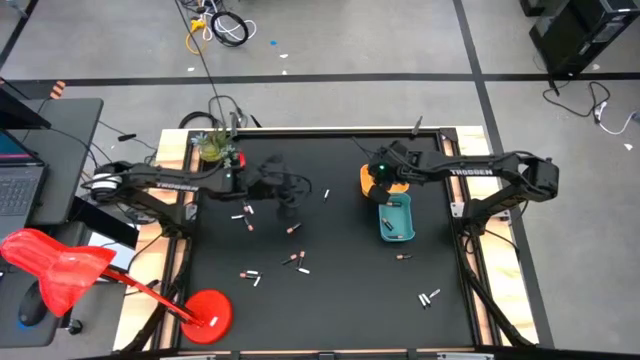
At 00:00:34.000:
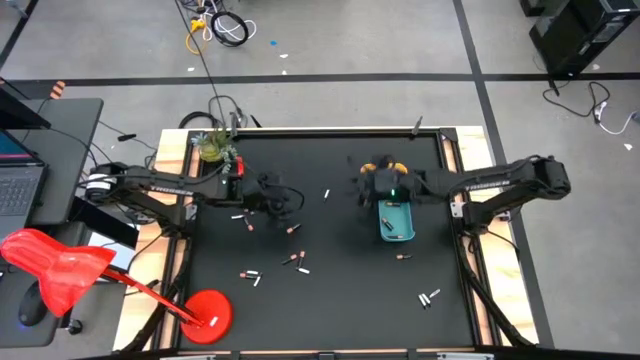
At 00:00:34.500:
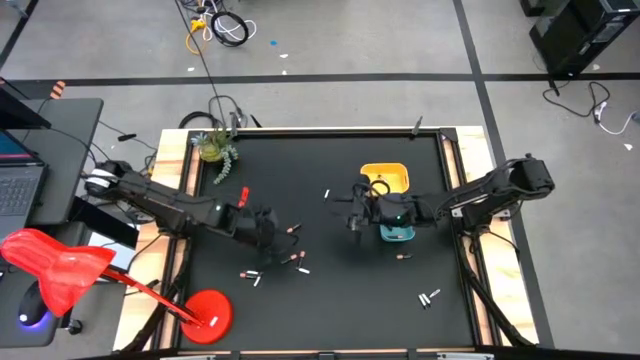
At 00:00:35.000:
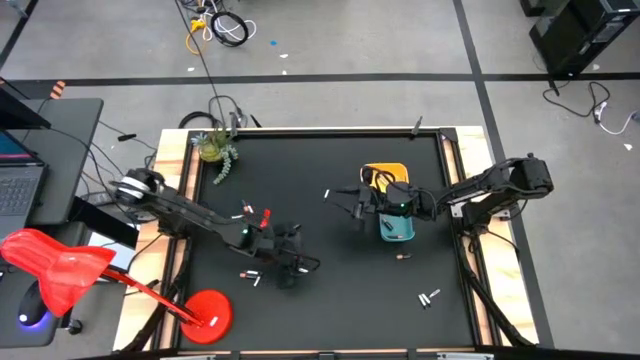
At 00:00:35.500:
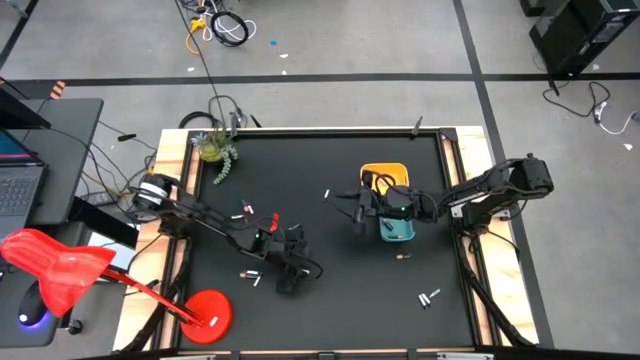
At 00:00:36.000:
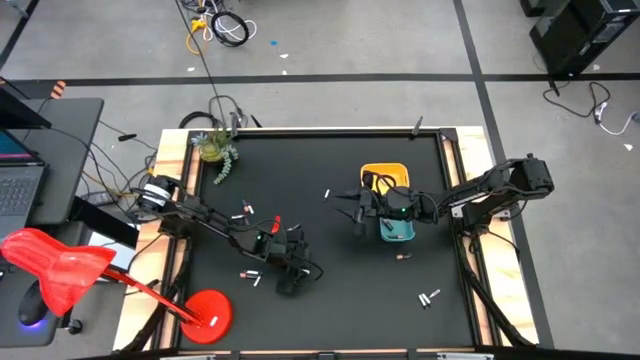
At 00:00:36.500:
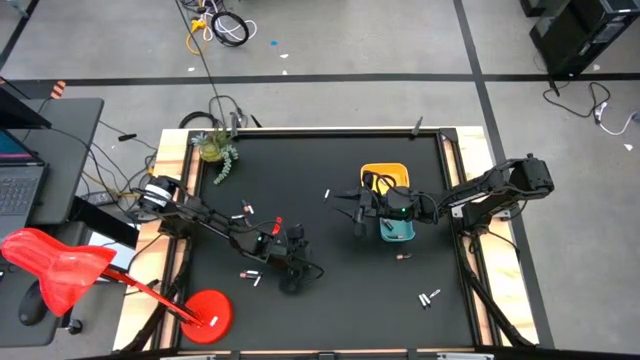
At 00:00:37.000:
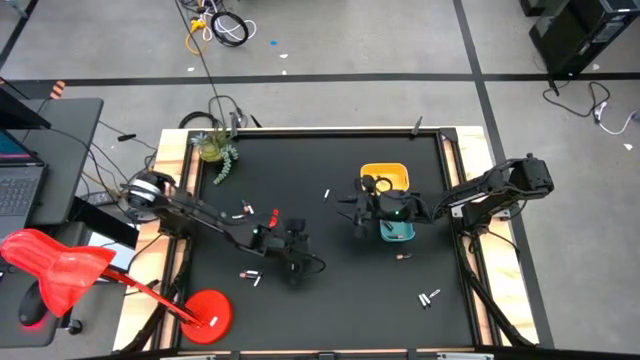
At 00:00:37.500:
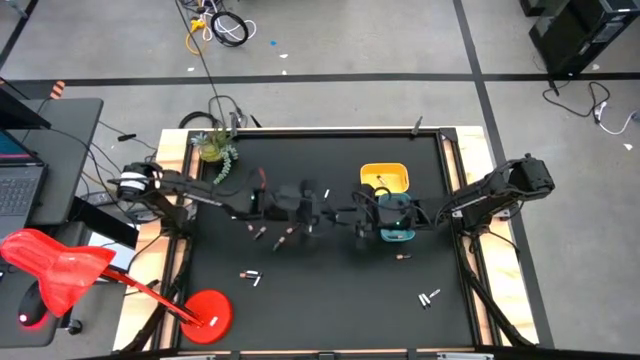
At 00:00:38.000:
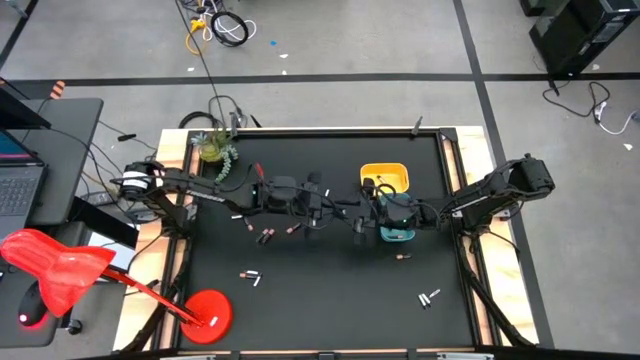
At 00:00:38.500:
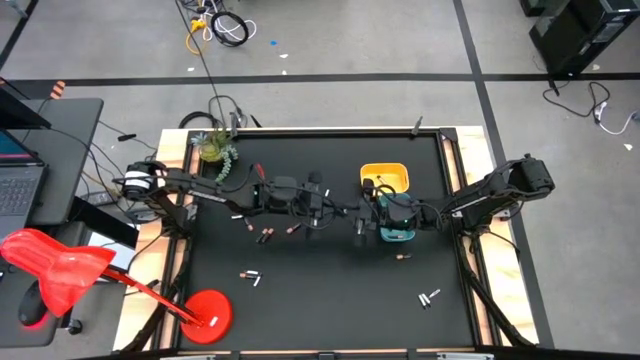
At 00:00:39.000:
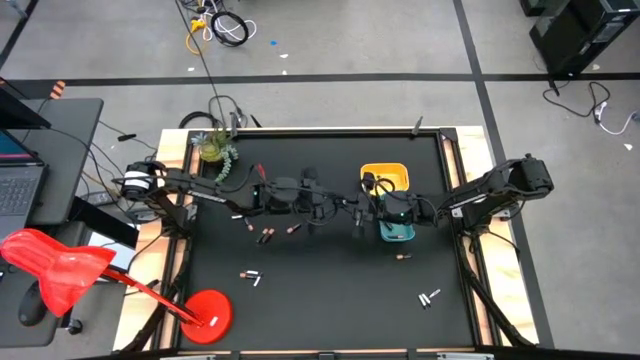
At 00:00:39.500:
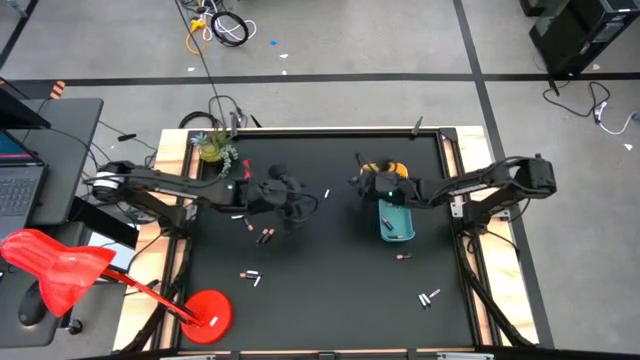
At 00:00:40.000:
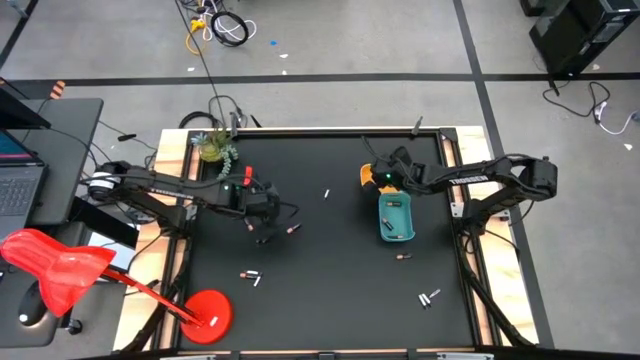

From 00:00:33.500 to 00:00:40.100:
Task: Sort batteries
Put the silver black battery into the yellow bin

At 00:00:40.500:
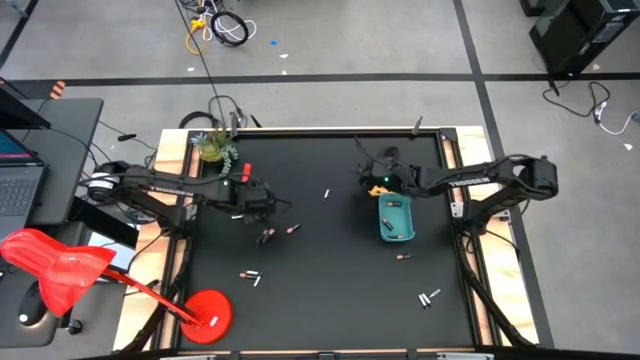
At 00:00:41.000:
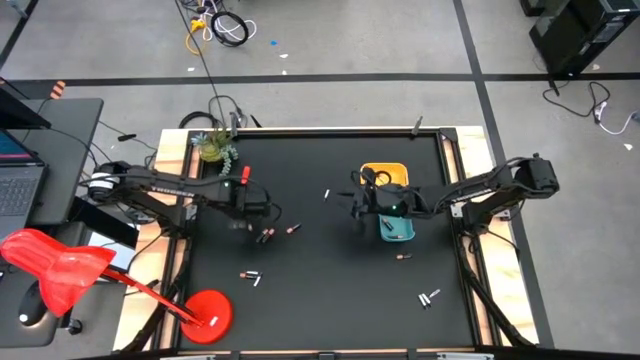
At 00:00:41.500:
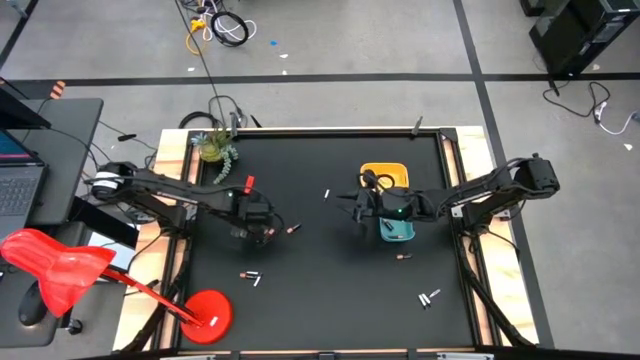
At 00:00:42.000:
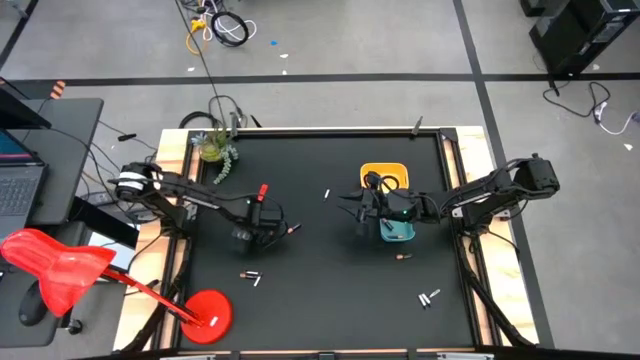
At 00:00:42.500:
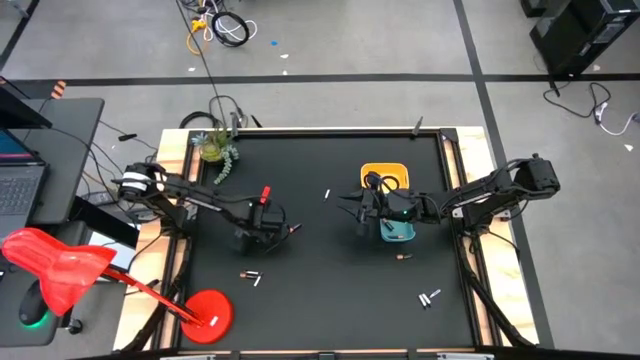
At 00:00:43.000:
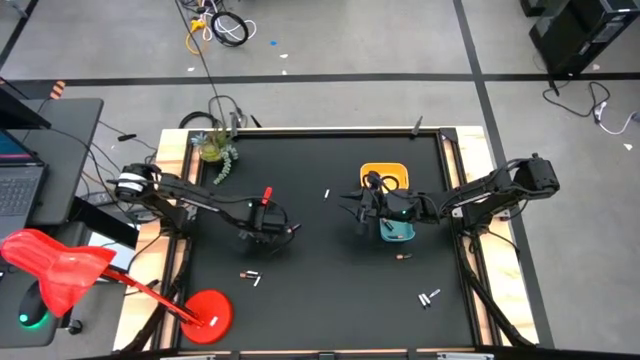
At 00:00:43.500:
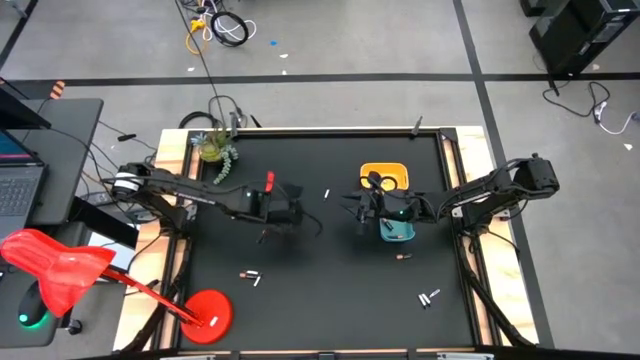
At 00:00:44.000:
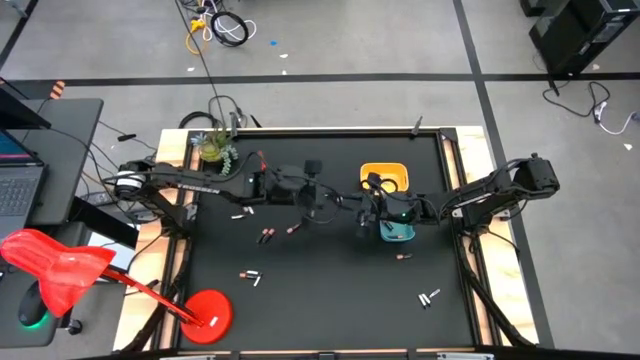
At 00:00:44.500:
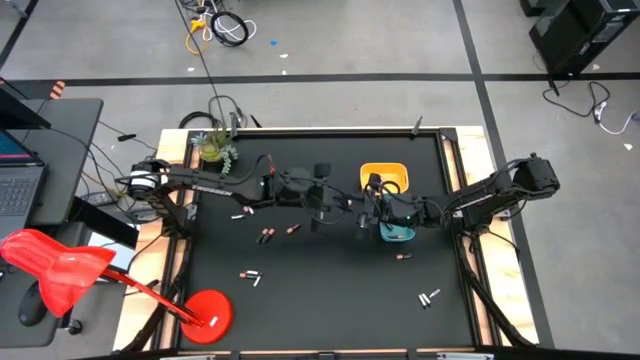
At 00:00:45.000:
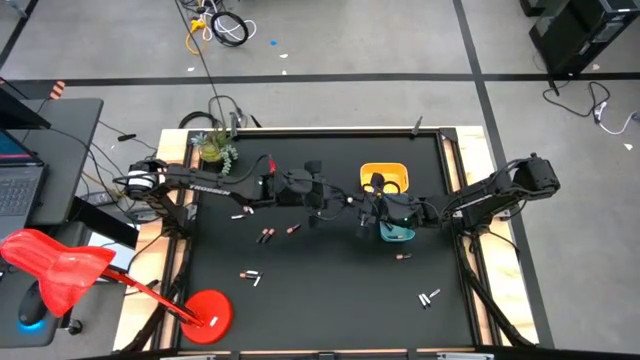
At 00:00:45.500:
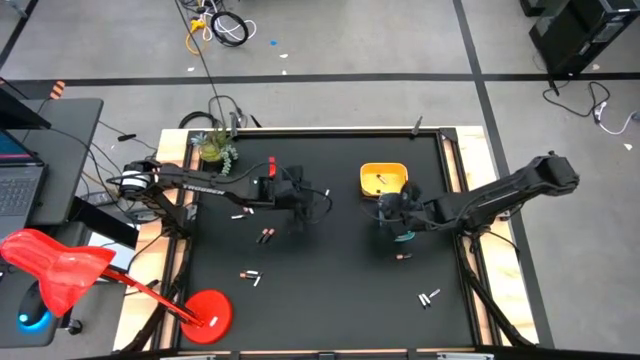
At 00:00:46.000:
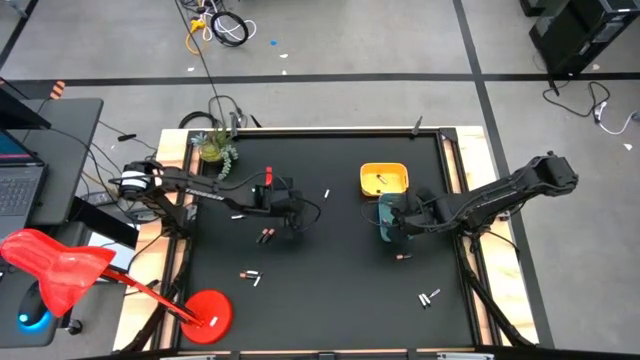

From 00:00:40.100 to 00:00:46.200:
Put the gold black battery into the blue bin

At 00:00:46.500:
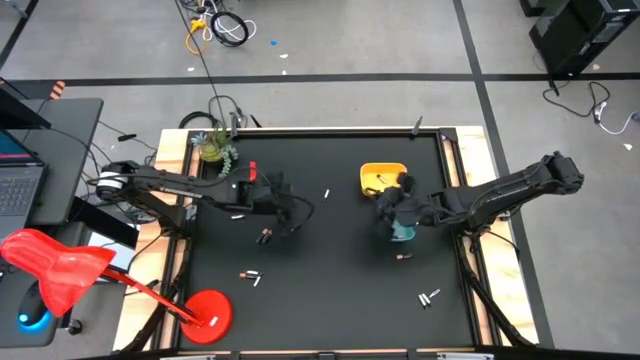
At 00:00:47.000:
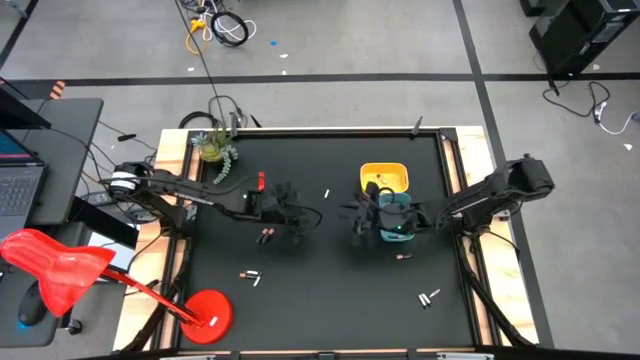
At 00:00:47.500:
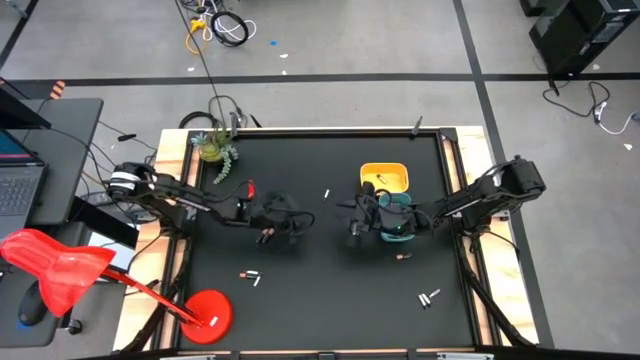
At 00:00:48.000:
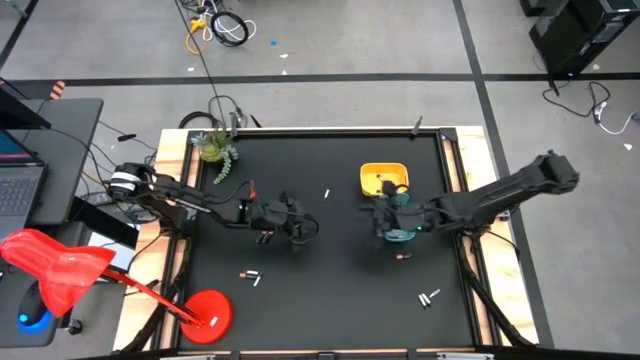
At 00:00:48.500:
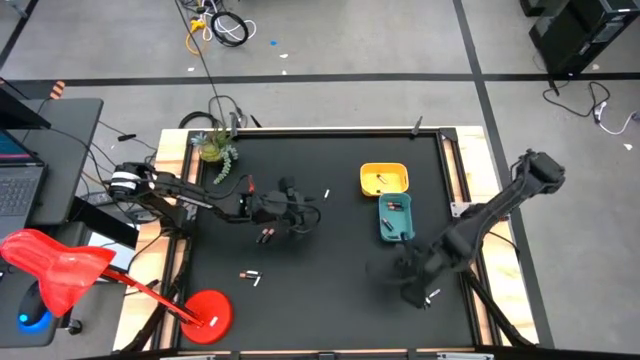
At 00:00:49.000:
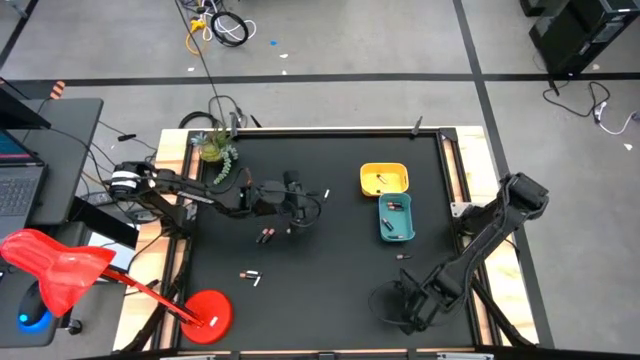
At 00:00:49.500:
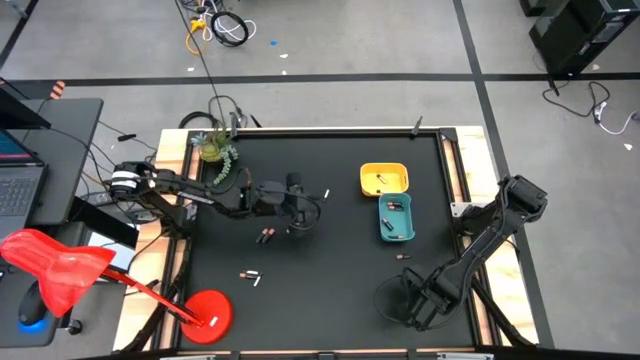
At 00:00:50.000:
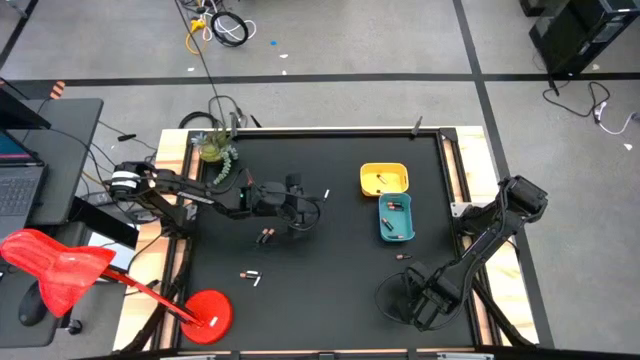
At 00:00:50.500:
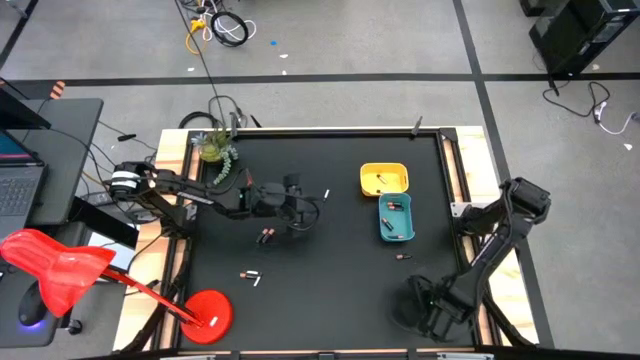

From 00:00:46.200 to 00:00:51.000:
Put the silver black battery into the yellow bin

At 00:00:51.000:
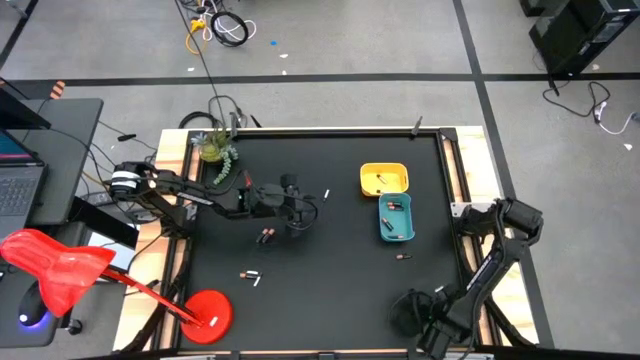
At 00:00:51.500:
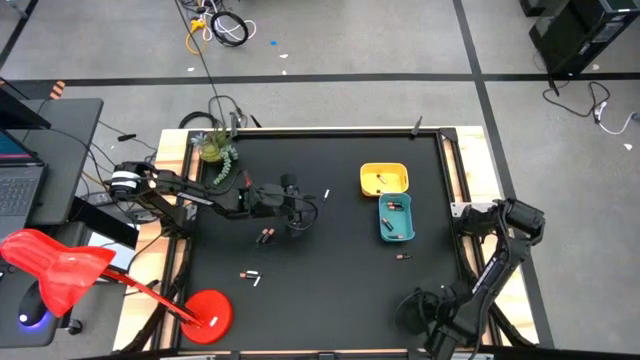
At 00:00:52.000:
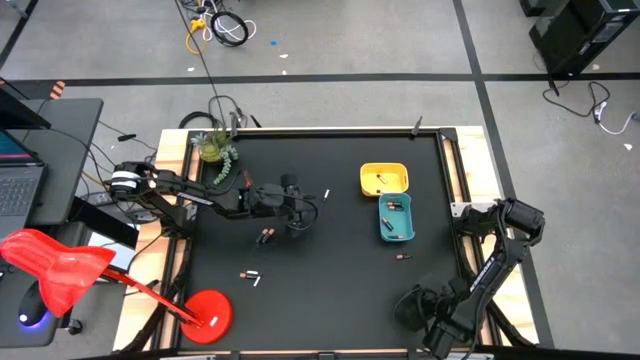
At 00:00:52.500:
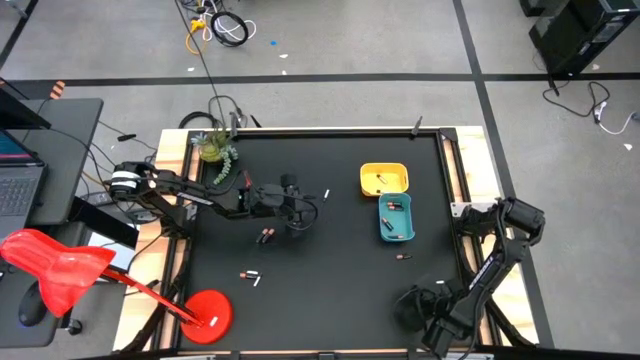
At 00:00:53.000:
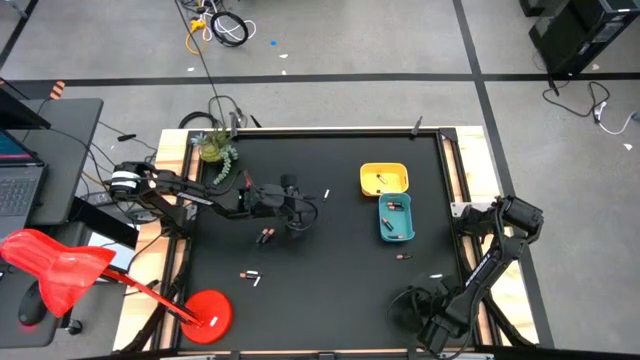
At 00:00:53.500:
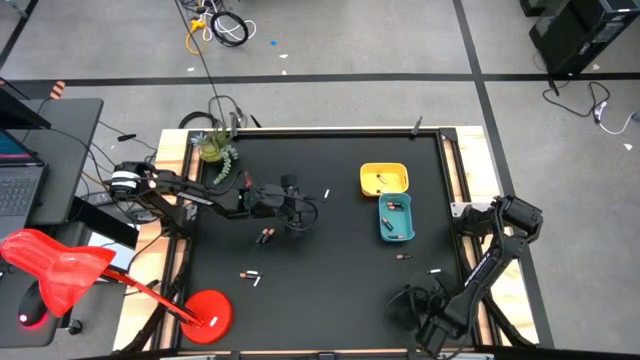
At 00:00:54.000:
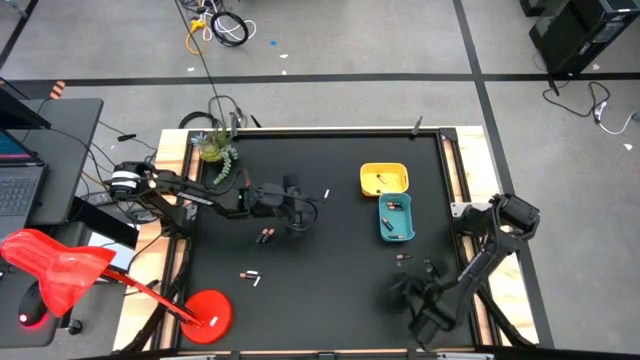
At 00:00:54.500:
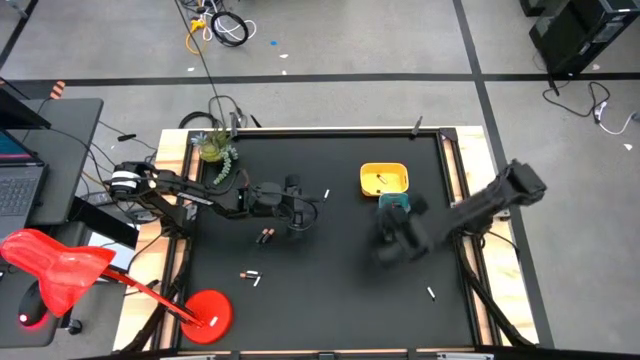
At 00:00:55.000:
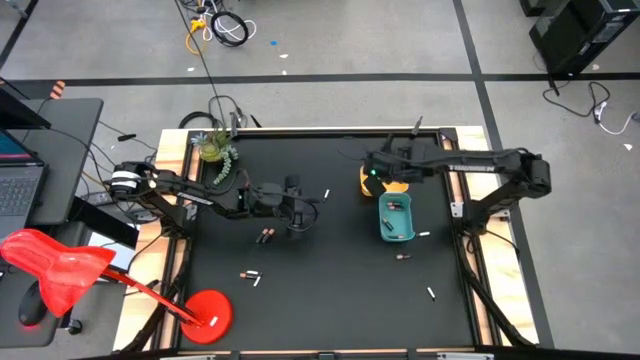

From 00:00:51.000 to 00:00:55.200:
Put the silver black battery into the yellow bin
